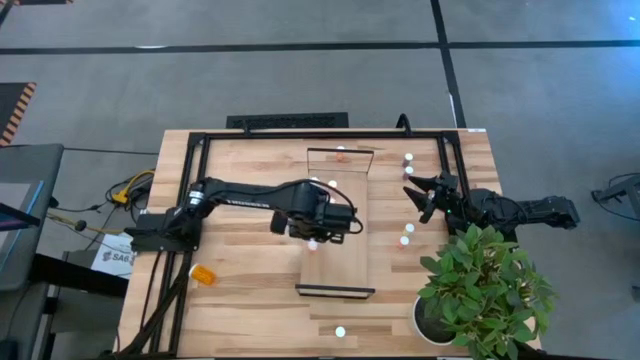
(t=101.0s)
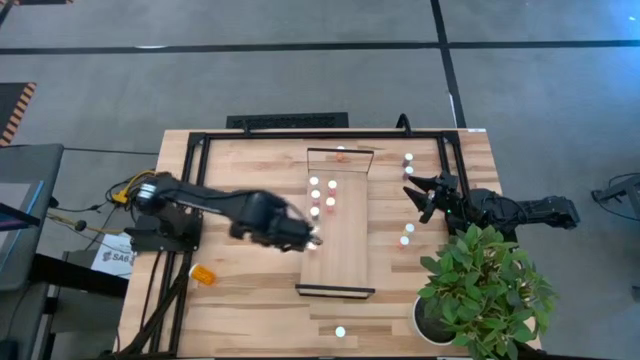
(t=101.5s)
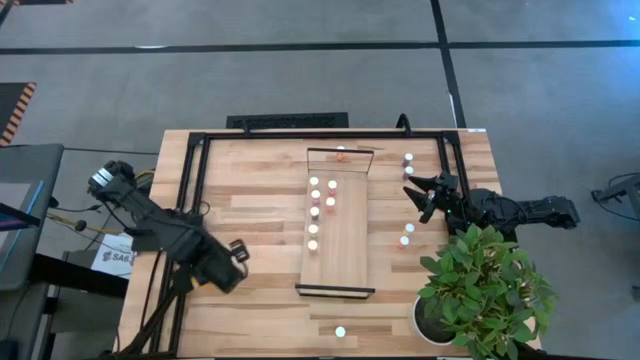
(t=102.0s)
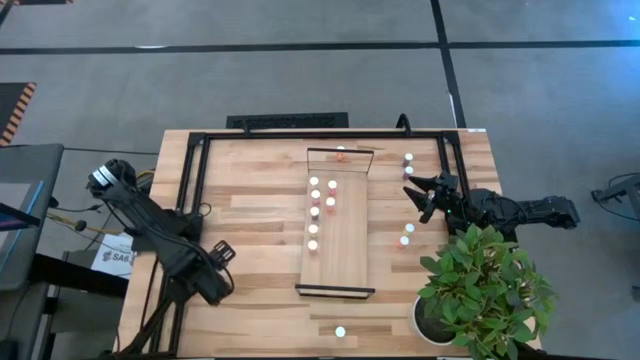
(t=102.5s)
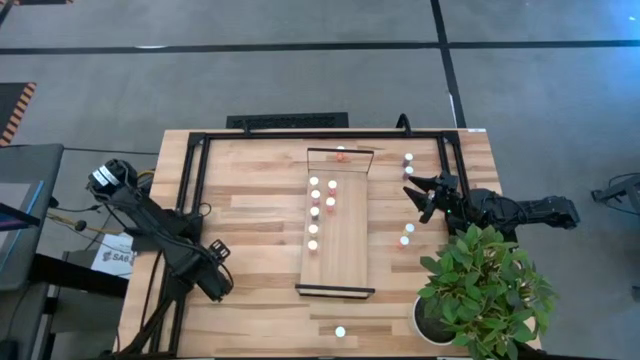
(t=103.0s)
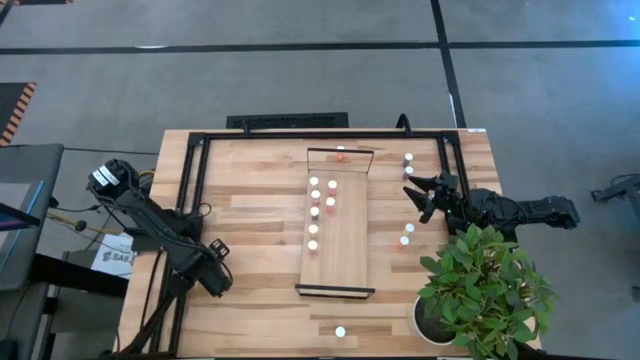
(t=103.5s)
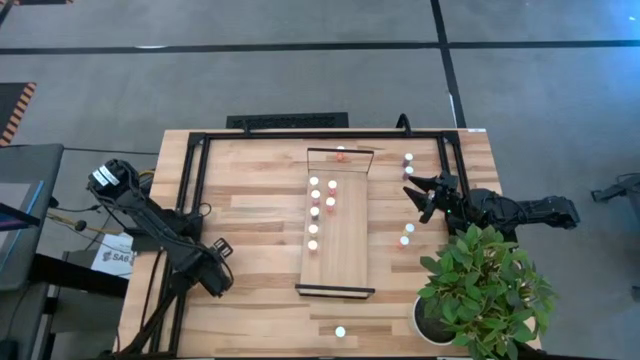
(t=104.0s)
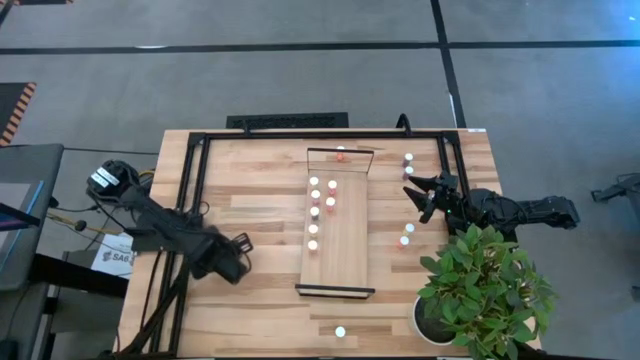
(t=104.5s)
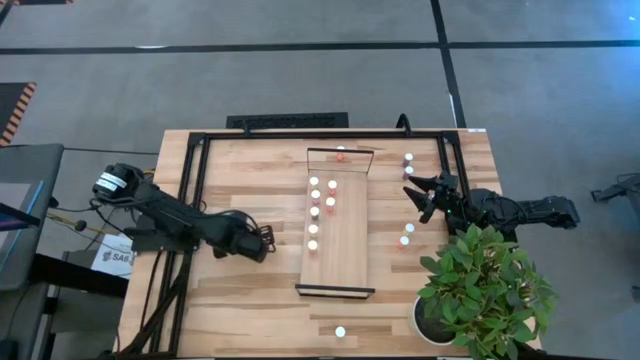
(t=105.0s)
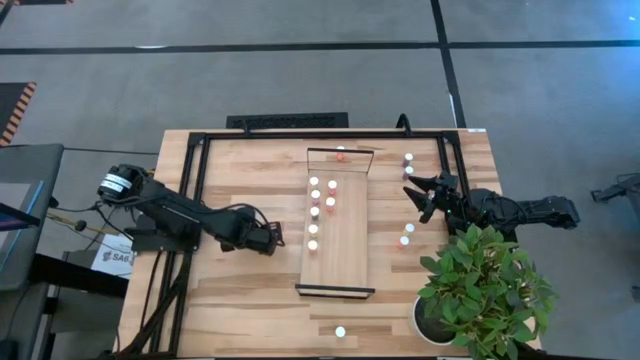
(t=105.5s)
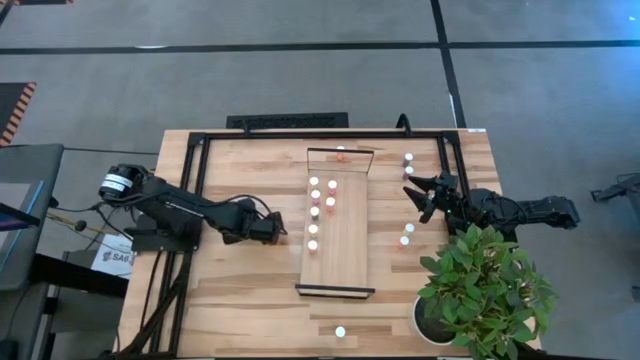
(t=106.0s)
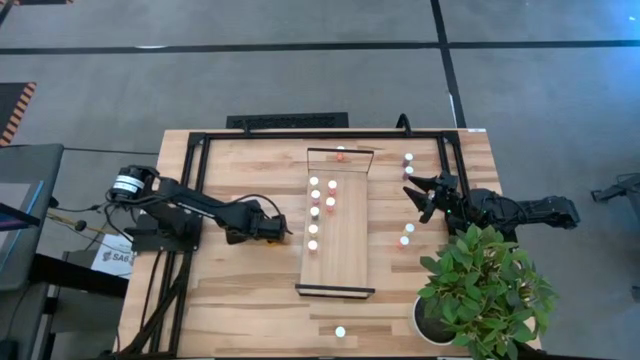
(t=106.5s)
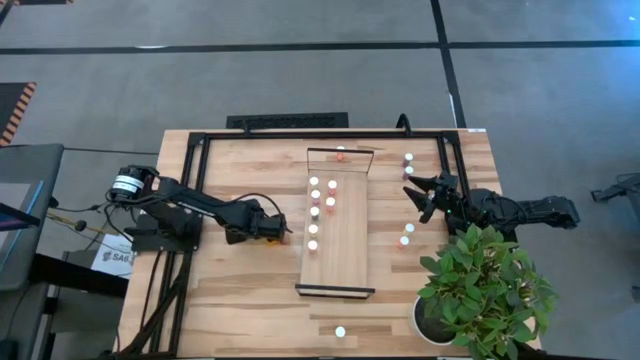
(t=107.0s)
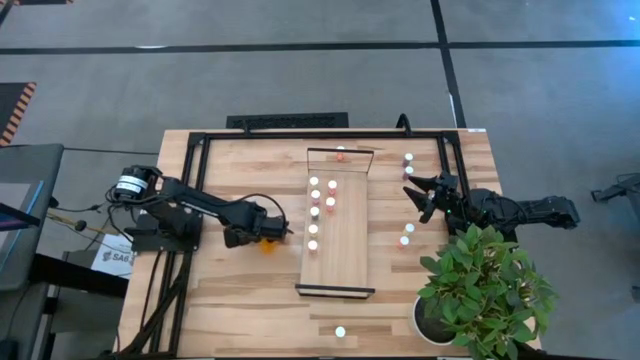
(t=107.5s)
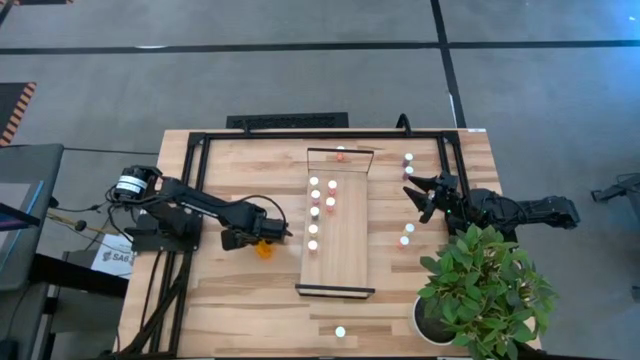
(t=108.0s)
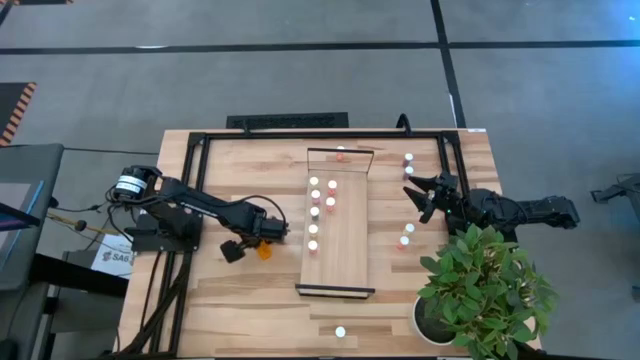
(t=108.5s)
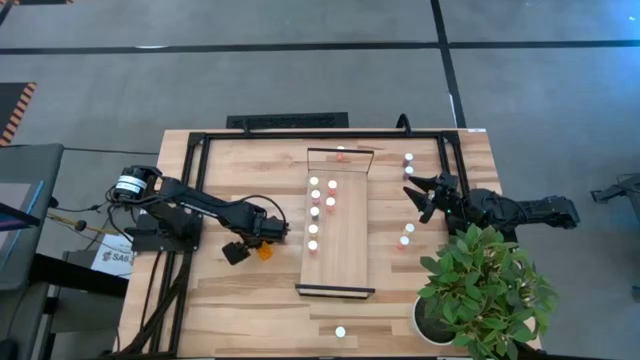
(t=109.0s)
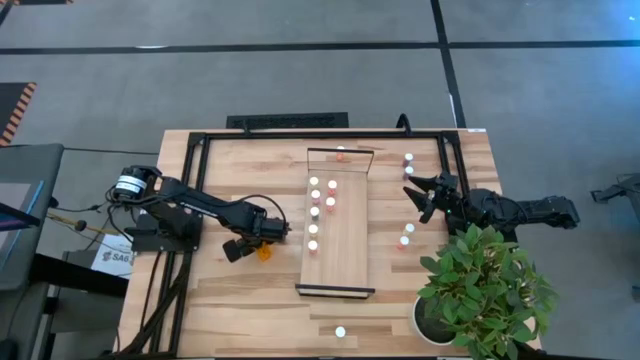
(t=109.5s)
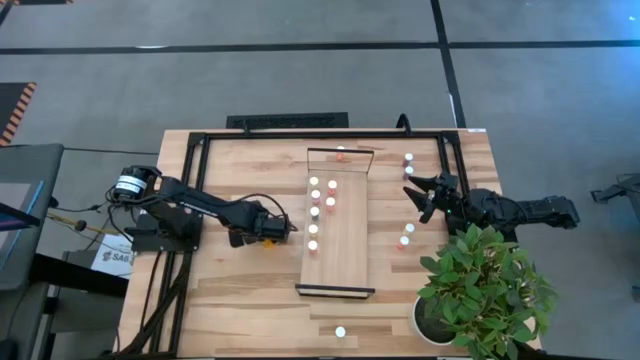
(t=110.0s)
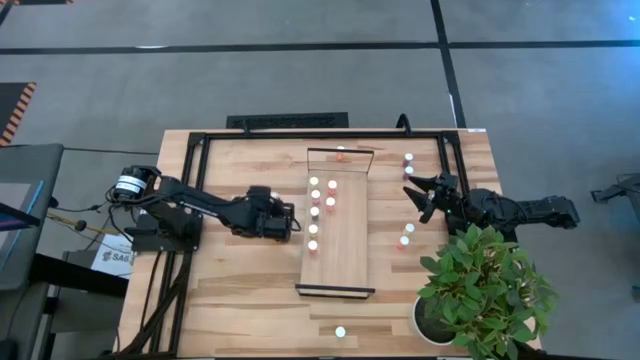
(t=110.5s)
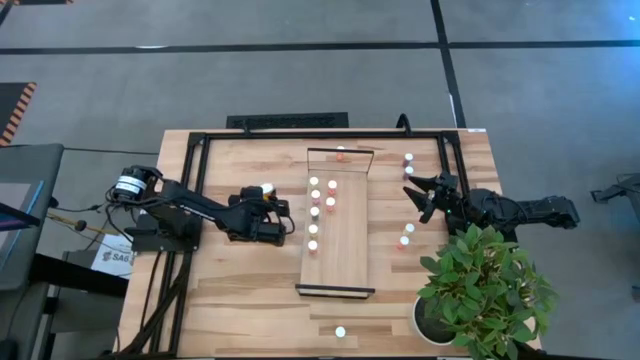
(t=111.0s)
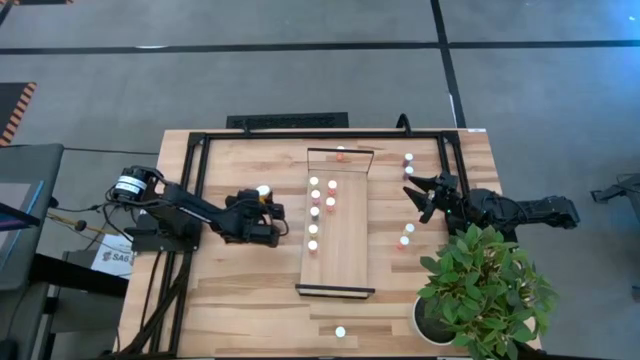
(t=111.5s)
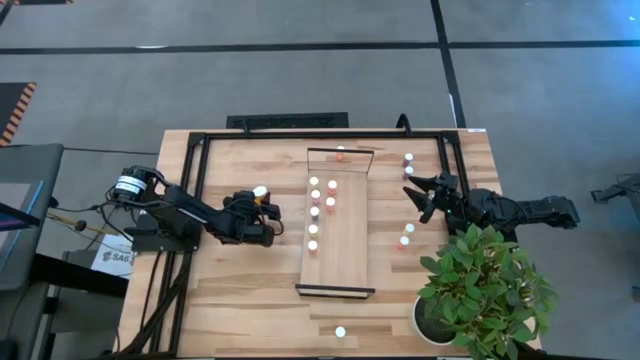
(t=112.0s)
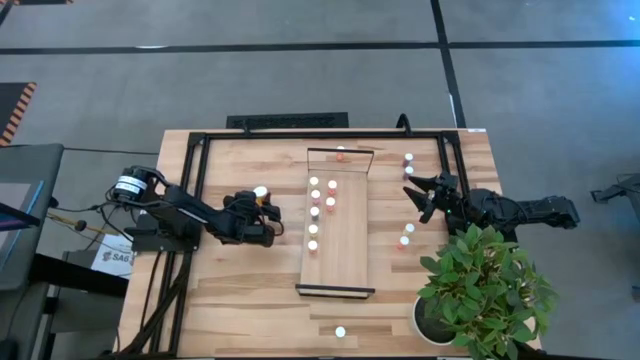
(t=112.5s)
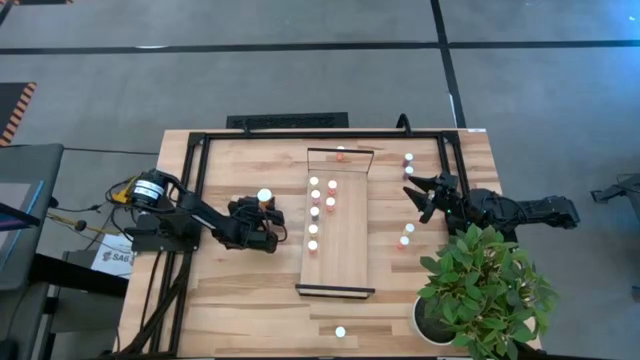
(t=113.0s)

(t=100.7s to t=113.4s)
Task: Pick and place medicine bottles onto shelf by color
Put the orange pill bottle on the shelf

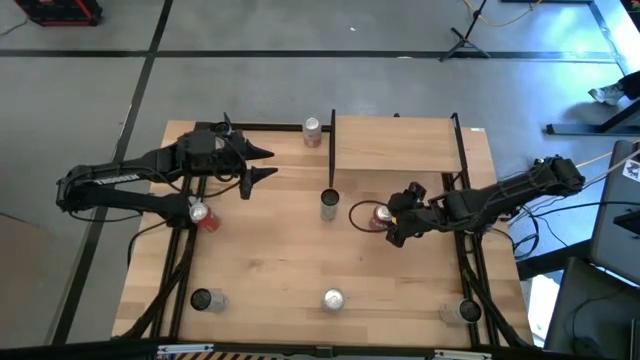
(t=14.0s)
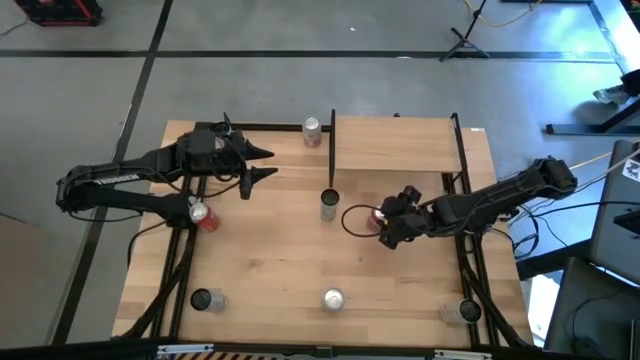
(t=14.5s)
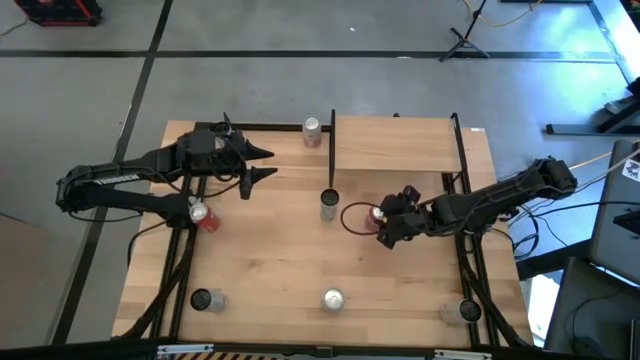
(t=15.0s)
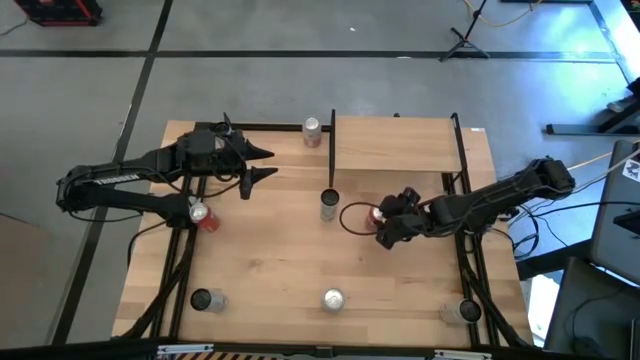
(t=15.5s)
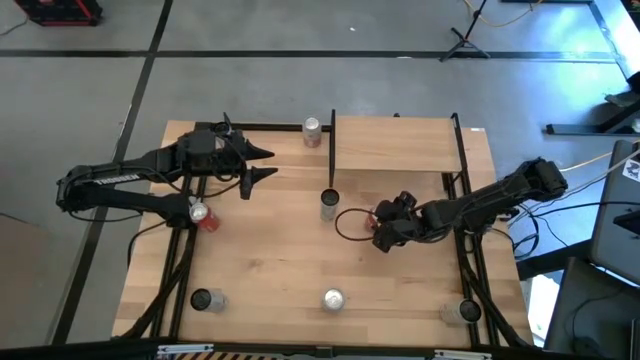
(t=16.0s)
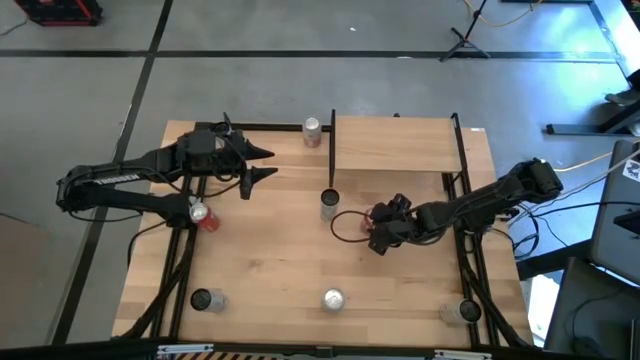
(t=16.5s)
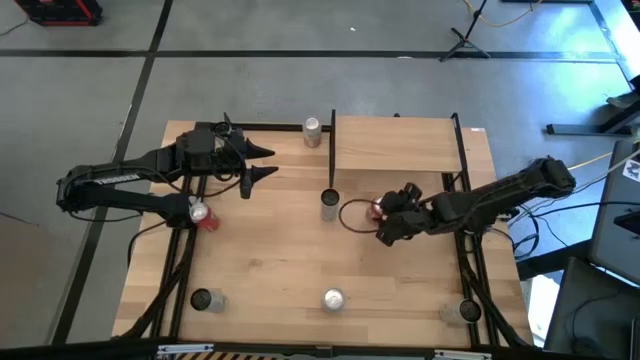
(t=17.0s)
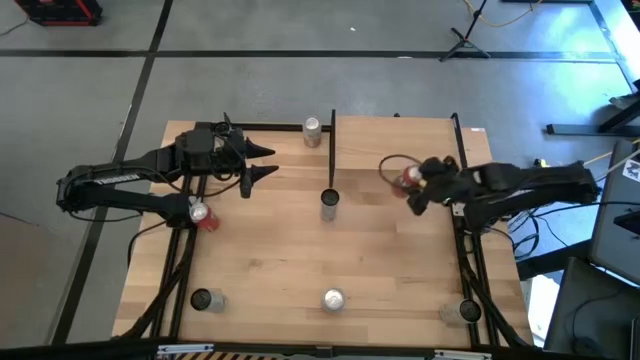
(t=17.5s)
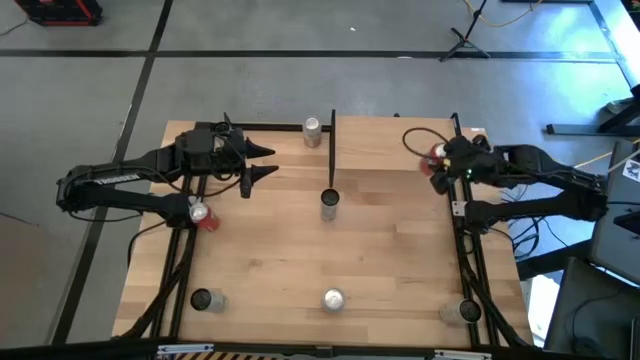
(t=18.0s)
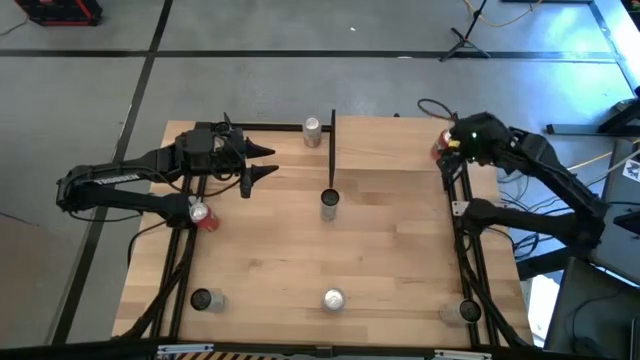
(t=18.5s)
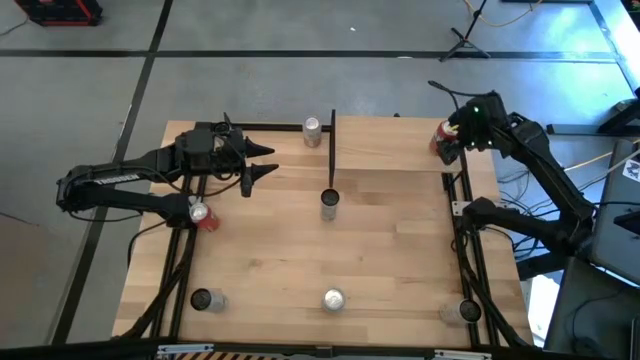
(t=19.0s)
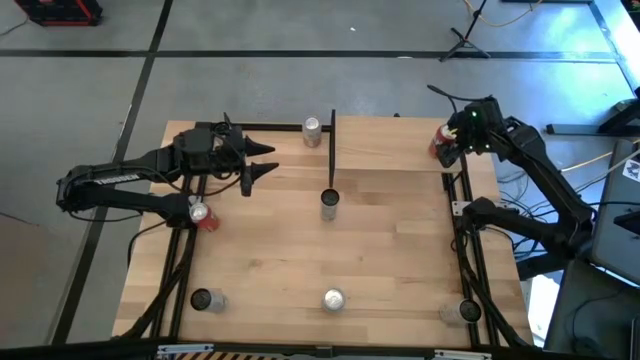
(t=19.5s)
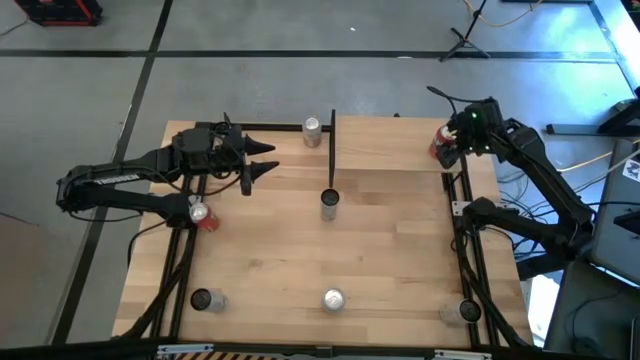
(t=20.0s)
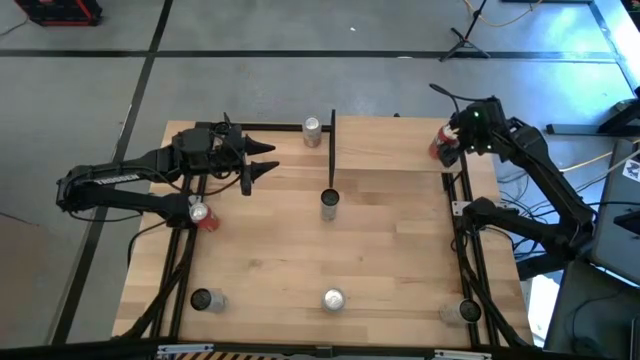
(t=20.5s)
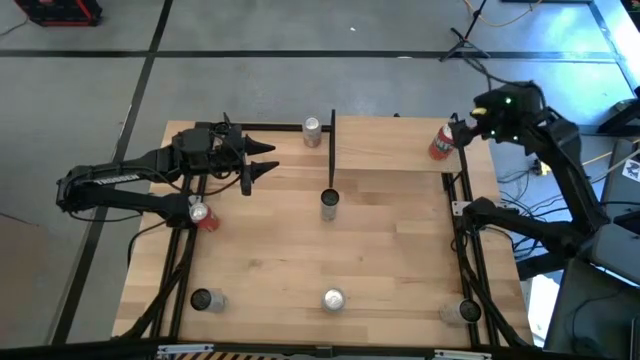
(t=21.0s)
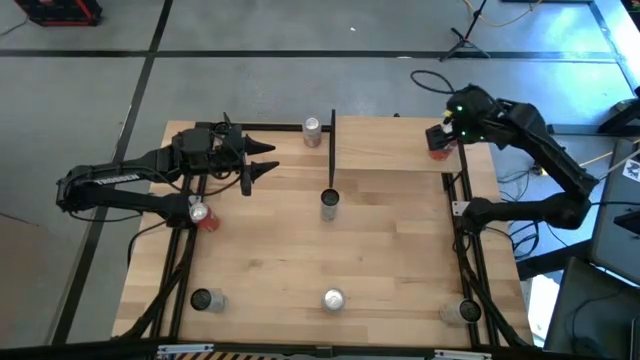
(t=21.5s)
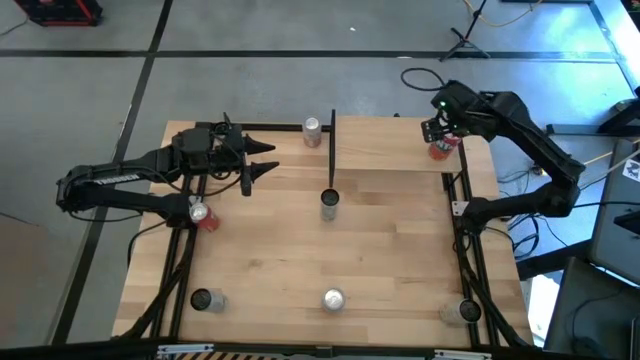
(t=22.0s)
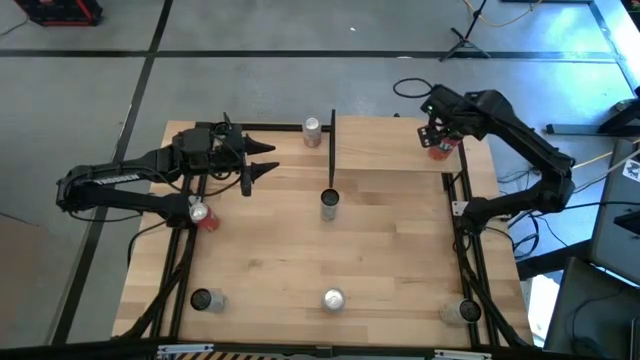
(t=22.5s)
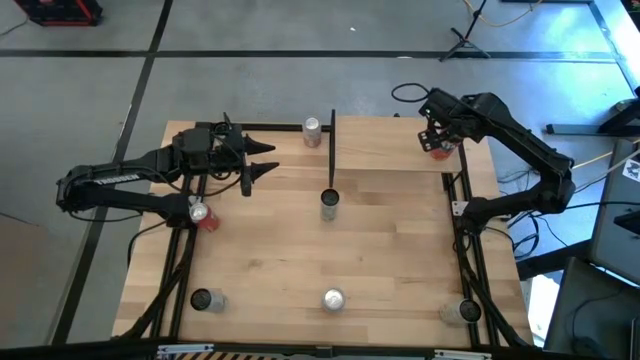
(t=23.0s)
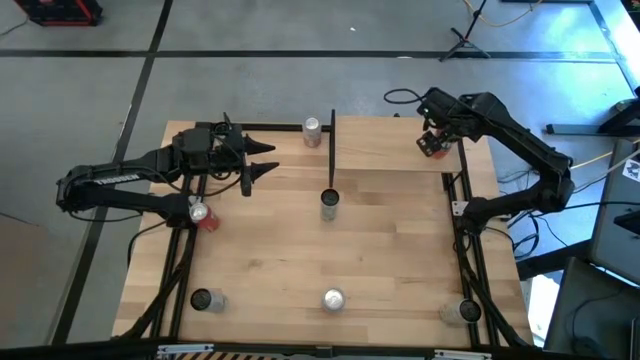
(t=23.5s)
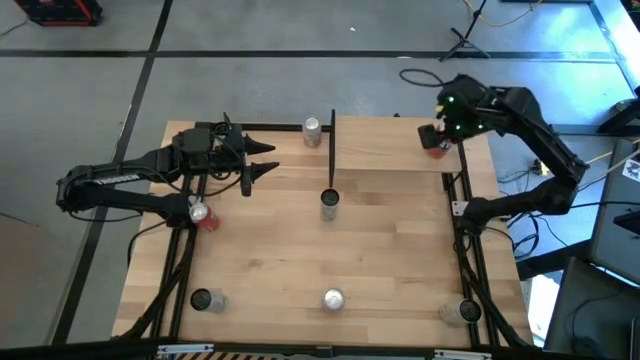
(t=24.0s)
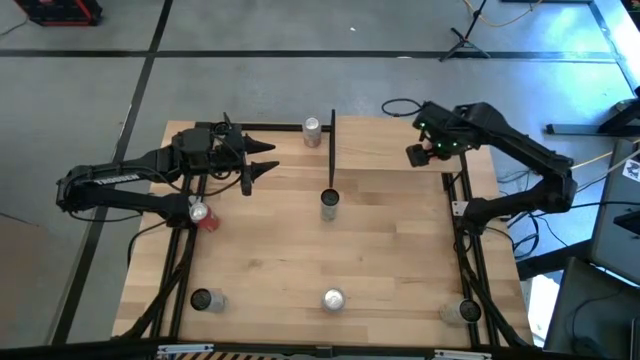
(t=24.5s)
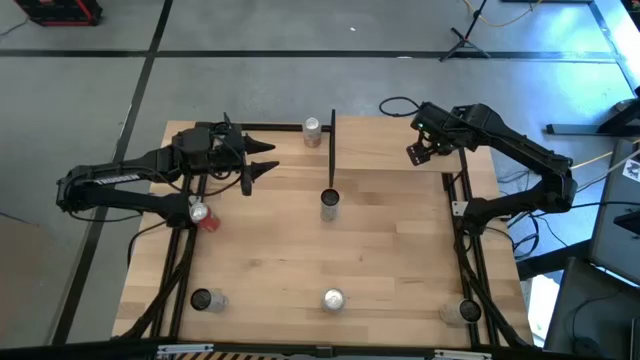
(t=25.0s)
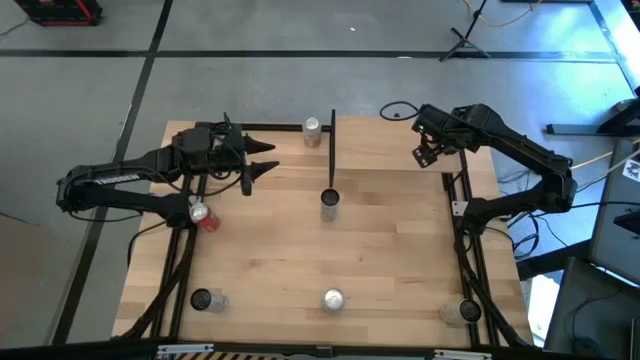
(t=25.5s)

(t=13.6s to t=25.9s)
Task: Place canned beverage on shelf
Put the left red soda can on the shelf
